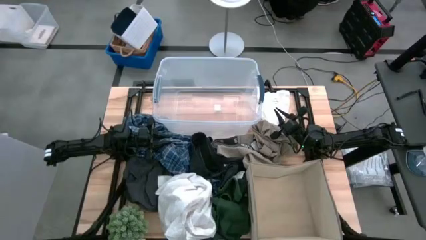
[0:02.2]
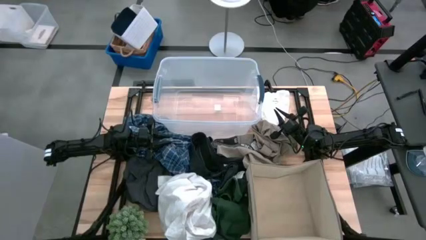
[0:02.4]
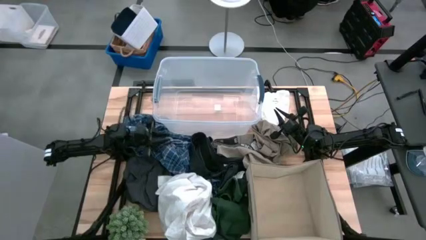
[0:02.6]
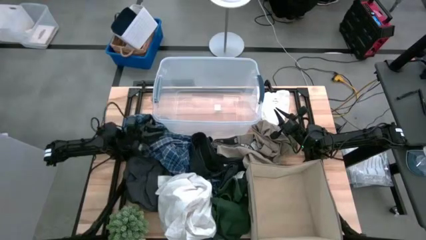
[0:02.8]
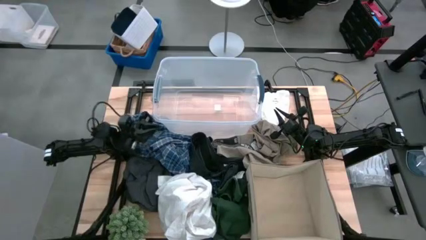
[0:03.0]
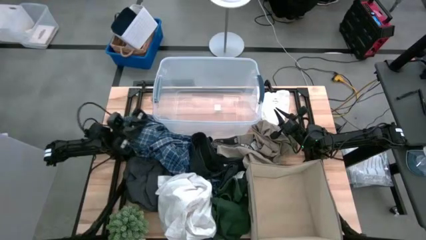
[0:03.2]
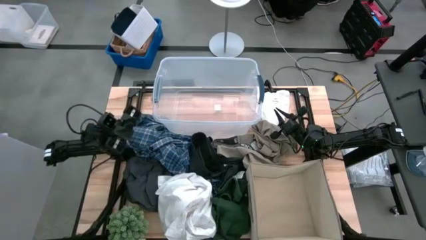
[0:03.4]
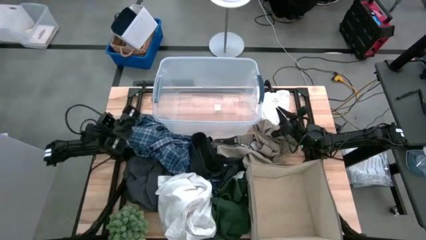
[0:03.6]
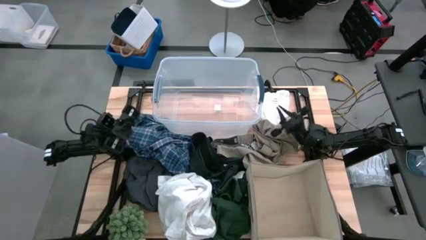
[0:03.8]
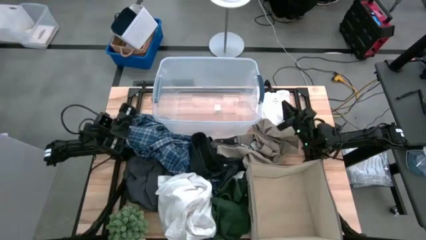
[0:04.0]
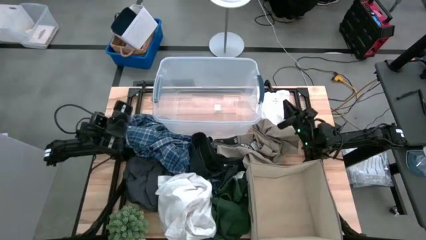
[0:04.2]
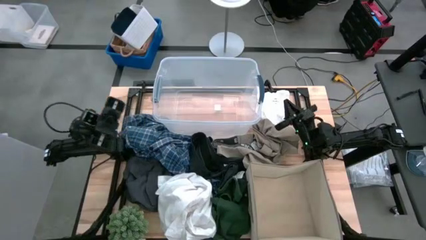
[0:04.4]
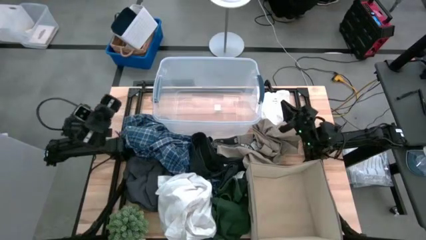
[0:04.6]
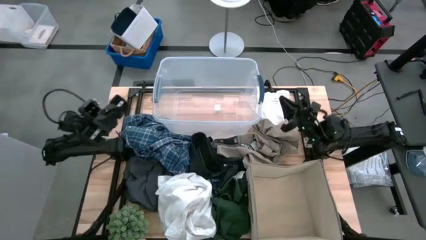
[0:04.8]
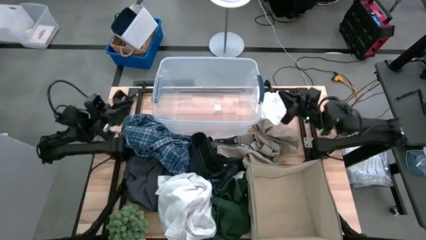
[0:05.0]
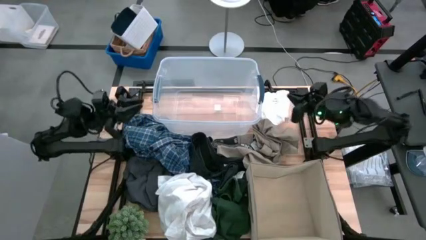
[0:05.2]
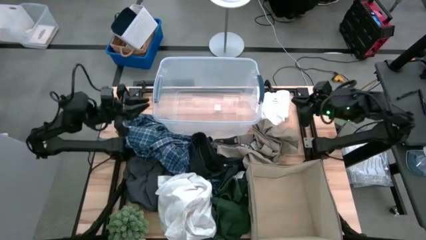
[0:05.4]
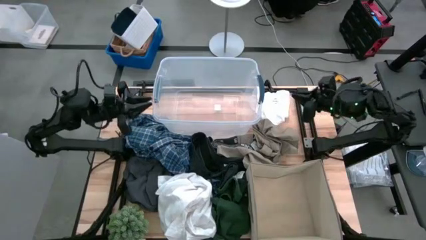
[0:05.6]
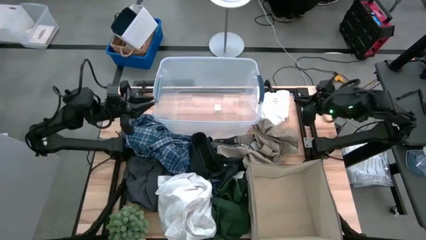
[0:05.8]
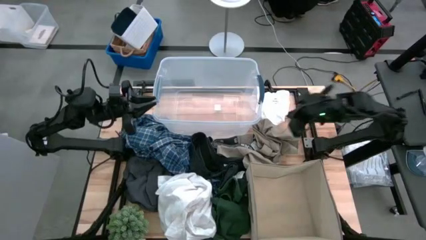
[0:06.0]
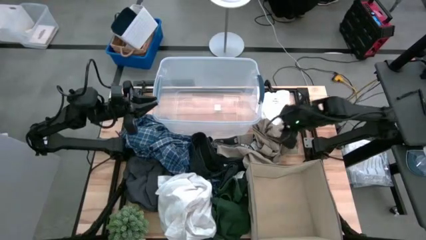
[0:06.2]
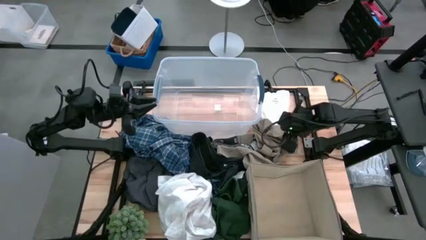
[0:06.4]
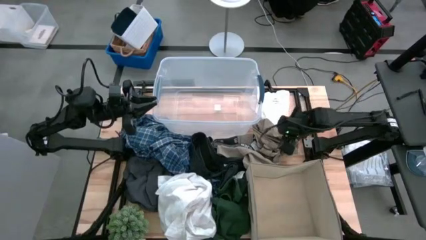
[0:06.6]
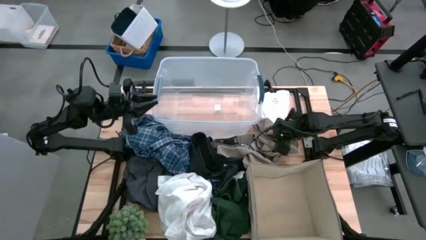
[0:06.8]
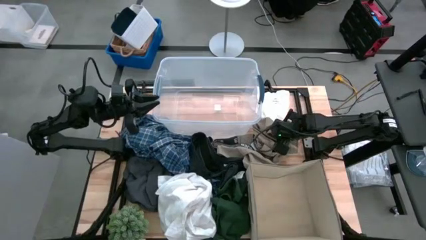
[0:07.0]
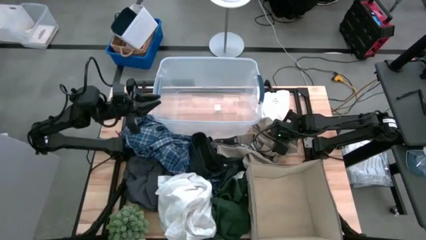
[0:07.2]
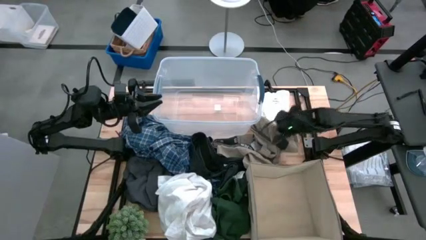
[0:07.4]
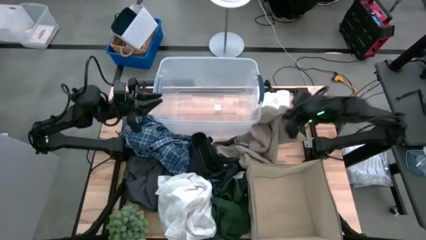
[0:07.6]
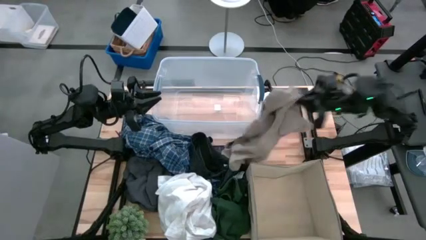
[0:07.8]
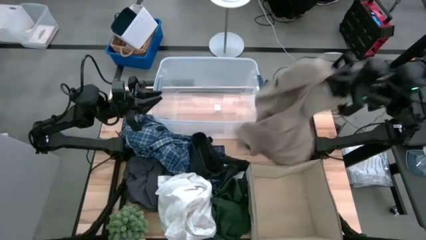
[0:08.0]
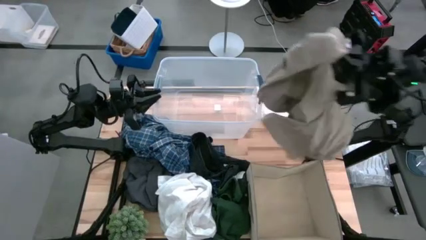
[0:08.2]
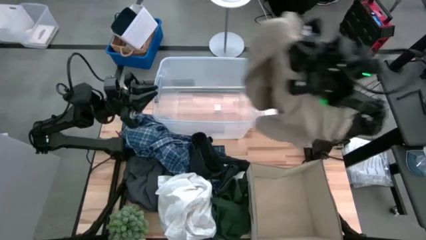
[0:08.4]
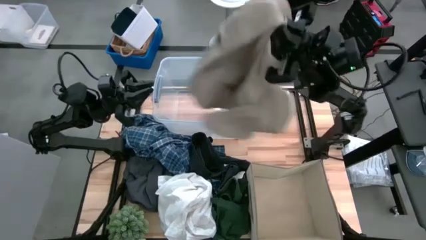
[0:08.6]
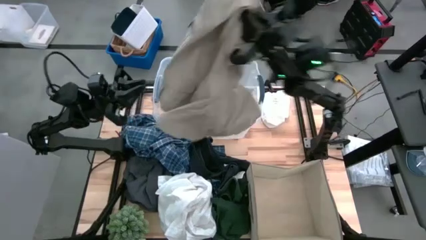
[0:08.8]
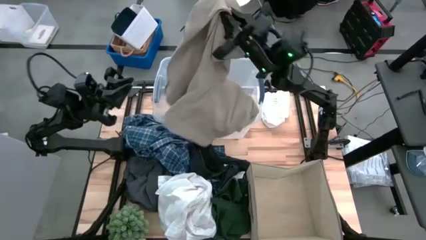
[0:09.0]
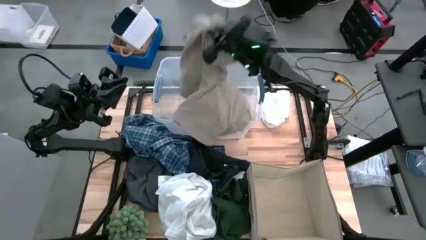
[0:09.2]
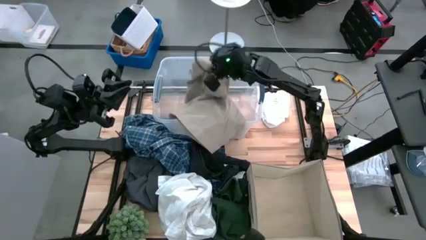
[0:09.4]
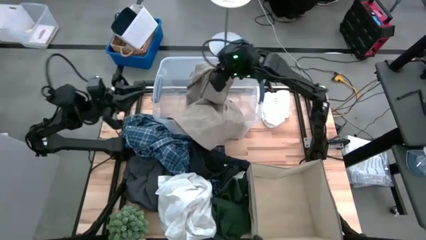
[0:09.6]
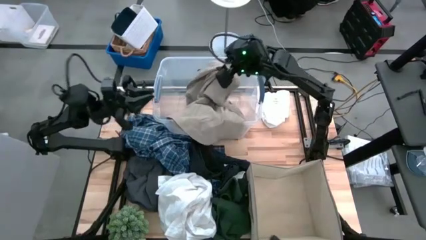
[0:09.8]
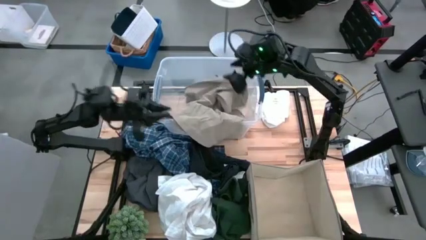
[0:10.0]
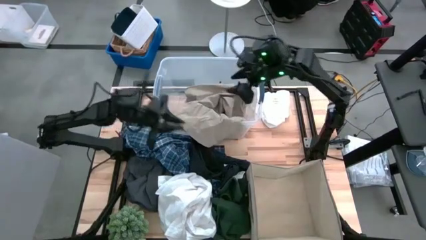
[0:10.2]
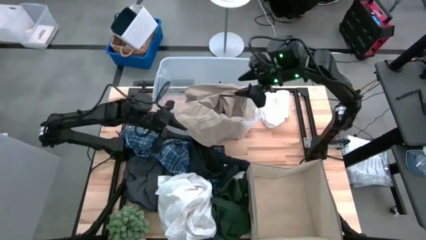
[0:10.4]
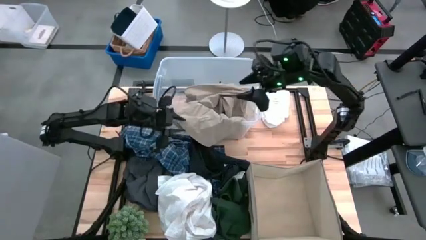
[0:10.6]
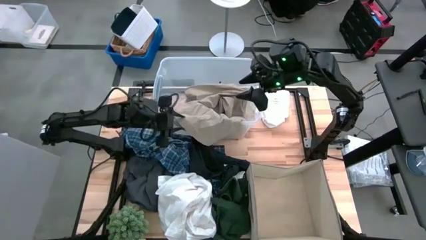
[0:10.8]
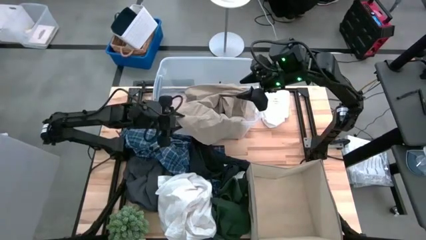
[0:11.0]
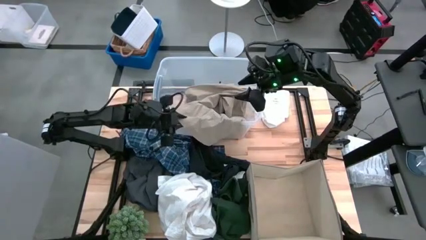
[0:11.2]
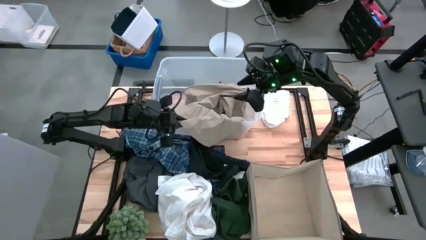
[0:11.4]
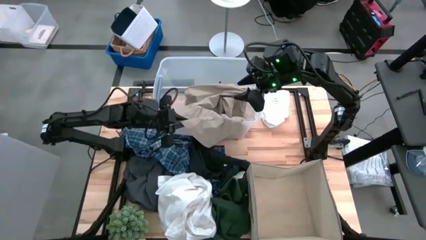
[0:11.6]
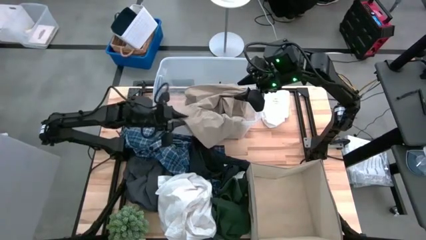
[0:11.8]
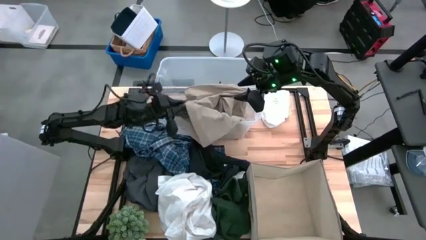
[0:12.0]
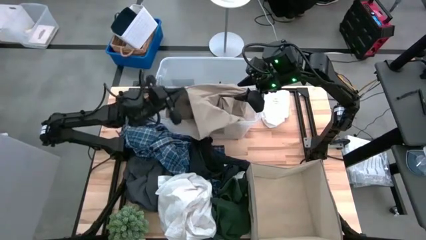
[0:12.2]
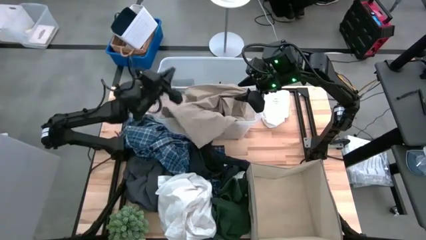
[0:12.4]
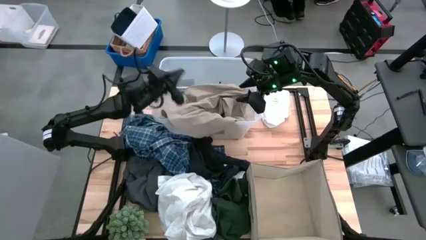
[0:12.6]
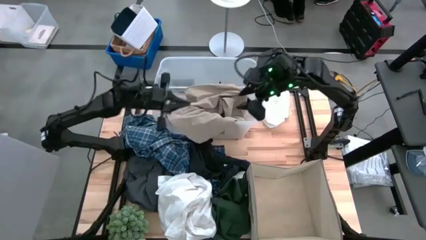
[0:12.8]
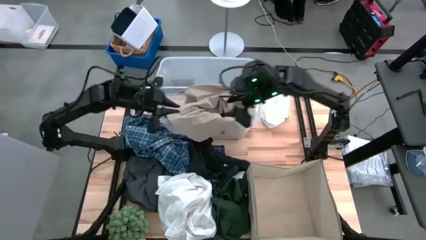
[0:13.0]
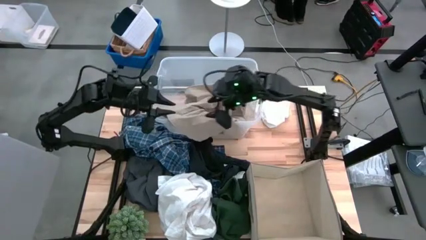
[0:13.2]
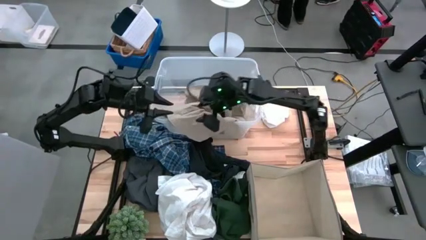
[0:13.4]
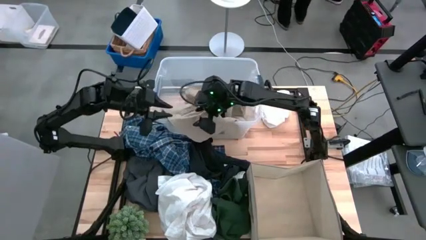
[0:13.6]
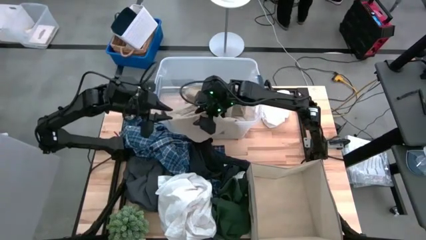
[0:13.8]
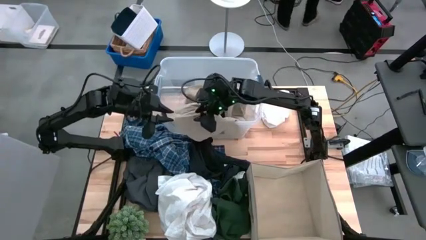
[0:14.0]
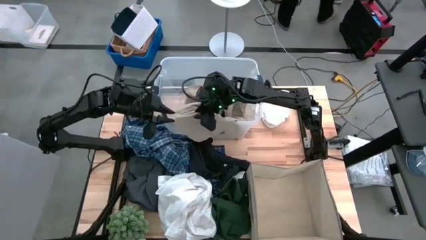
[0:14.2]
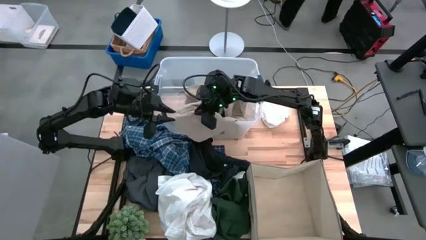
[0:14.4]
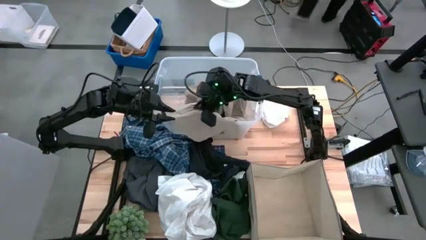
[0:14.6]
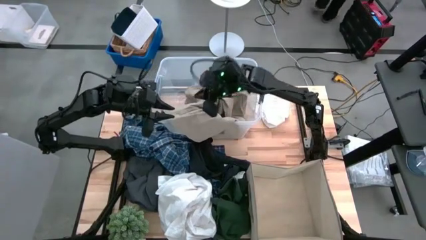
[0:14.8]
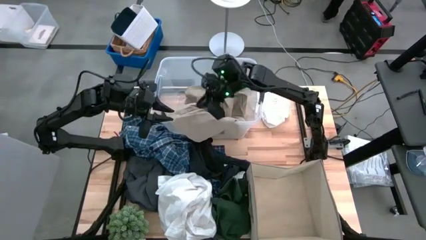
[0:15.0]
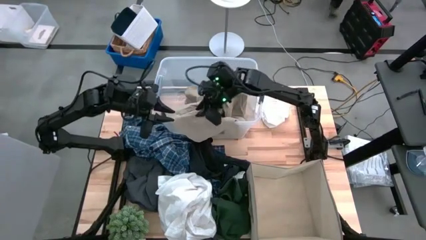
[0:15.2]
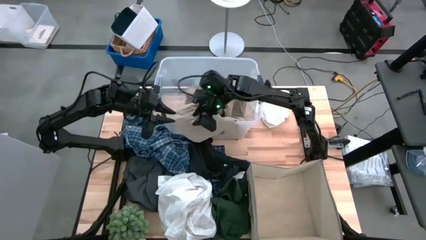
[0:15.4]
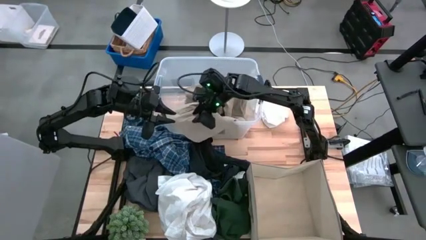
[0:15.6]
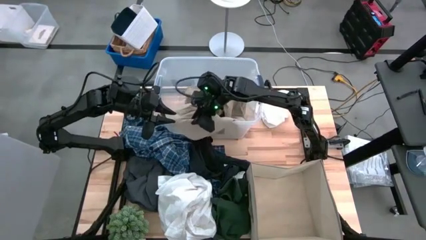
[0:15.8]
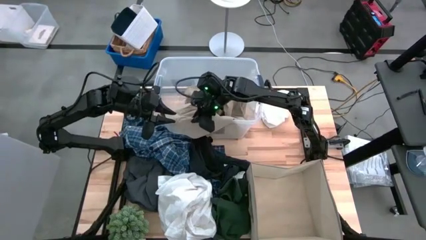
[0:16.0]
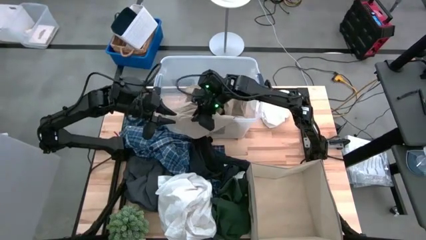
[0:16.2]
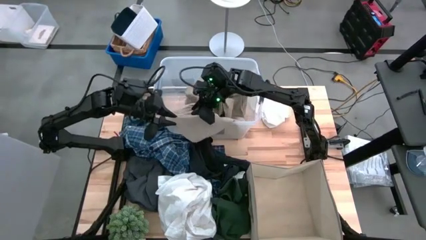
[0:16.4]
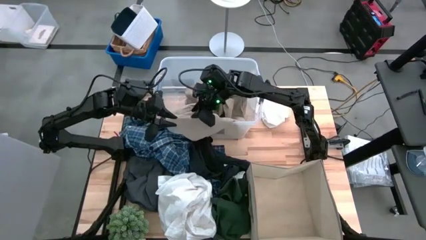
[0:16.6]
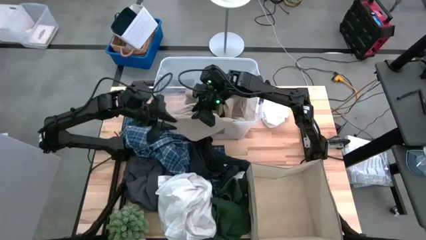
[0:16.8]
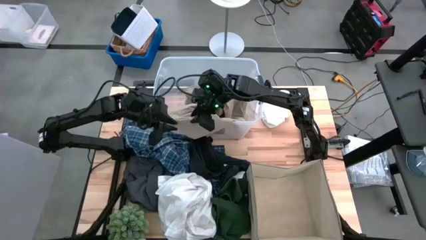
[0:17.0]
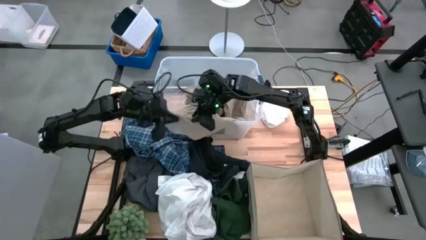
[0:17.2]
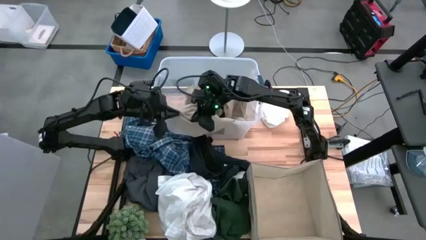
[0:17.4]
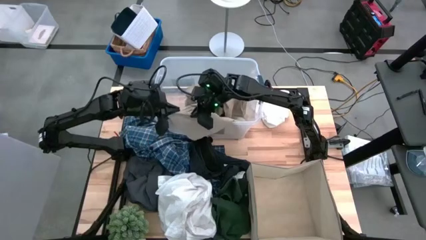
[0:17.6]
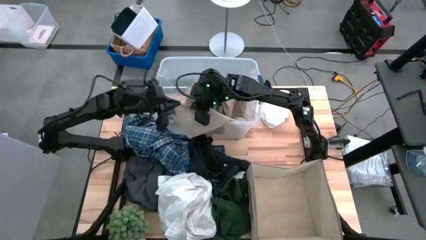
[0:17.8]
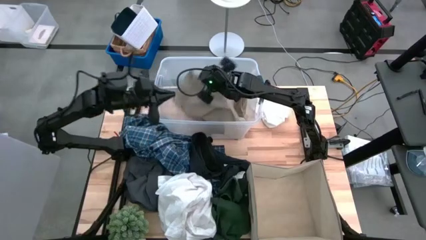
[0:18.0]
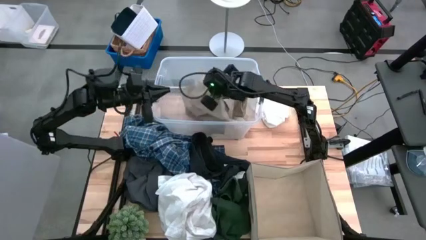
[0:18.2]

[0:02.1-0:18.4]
Task: Sort clothes
Put the brown shorts into the transparent bin
